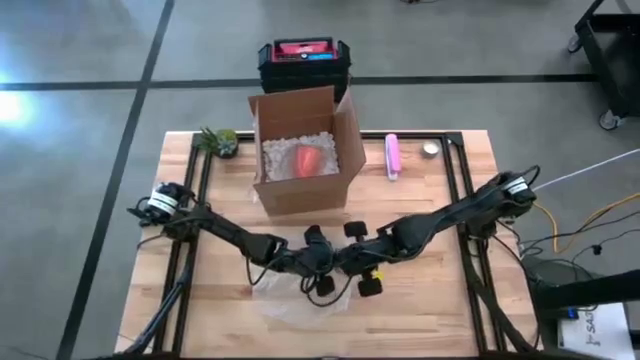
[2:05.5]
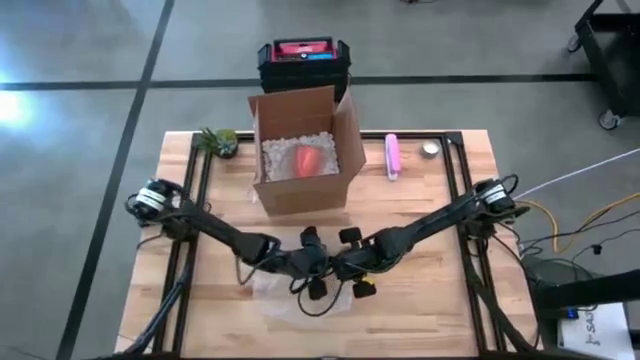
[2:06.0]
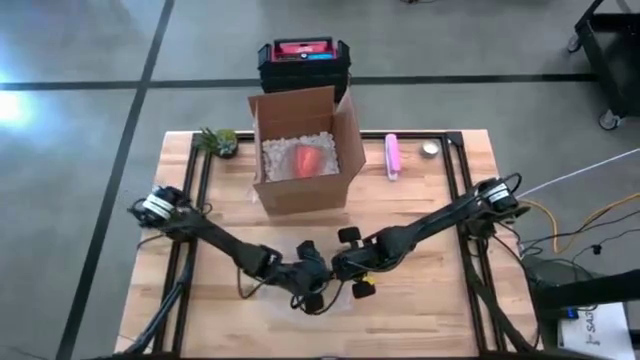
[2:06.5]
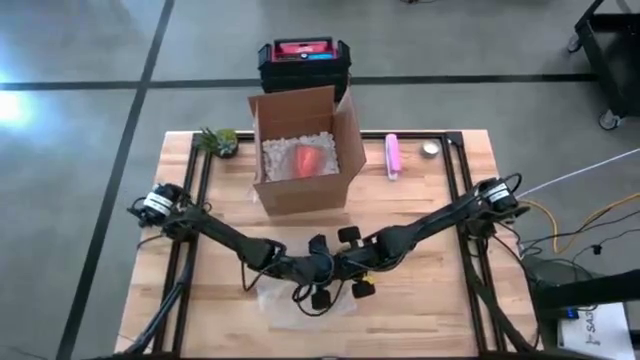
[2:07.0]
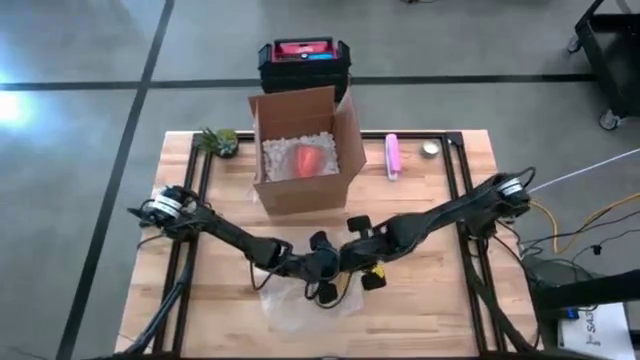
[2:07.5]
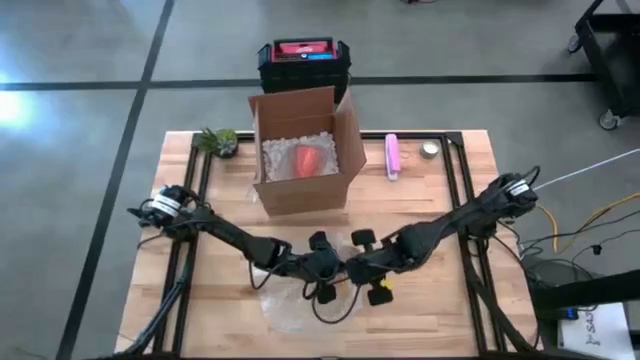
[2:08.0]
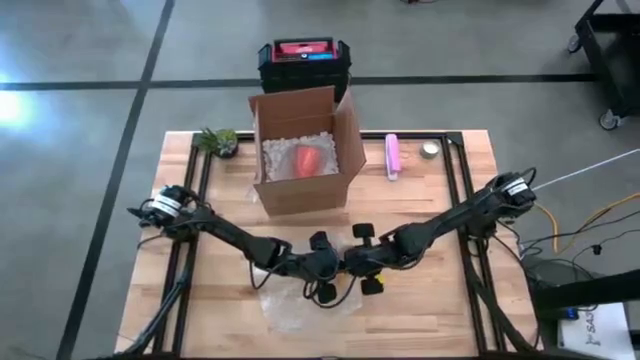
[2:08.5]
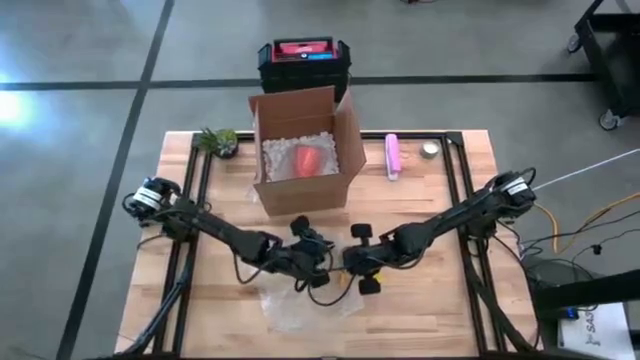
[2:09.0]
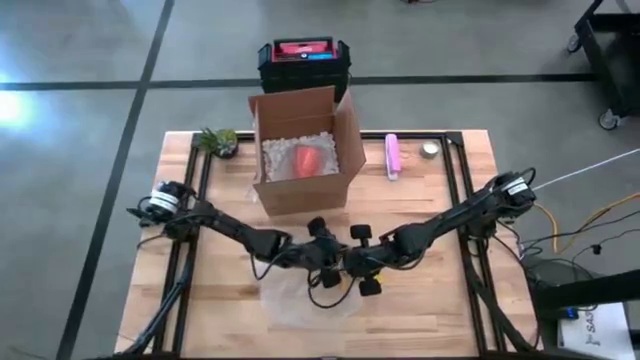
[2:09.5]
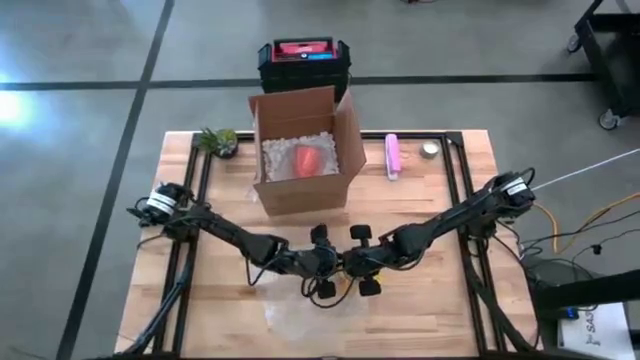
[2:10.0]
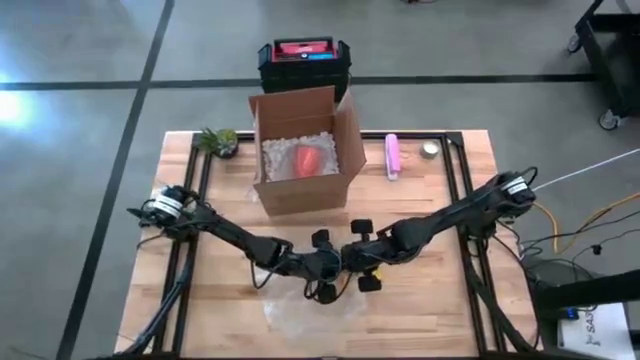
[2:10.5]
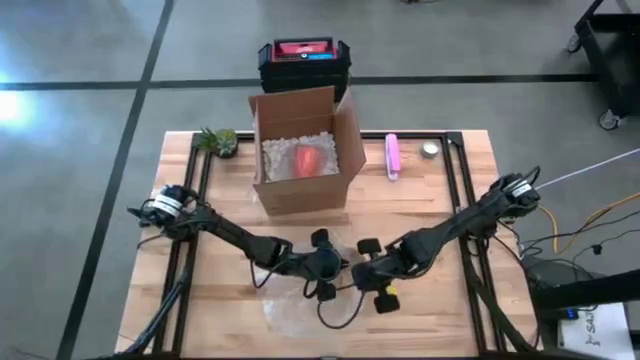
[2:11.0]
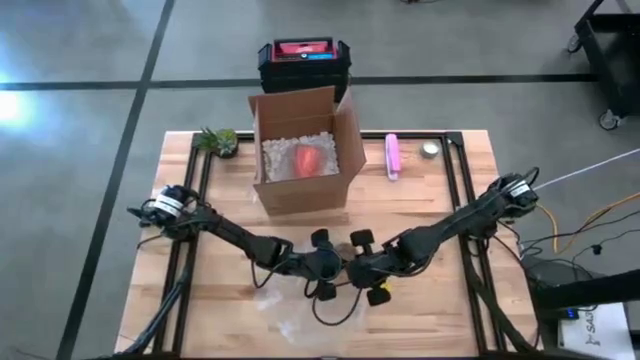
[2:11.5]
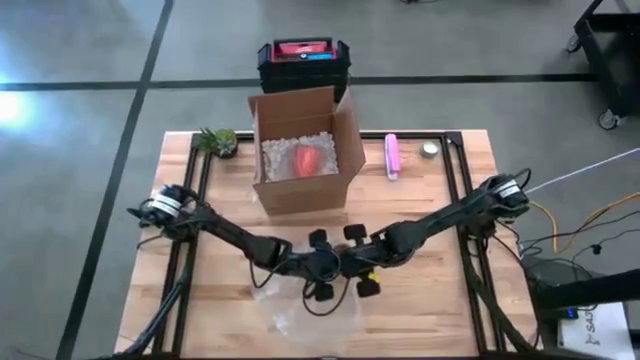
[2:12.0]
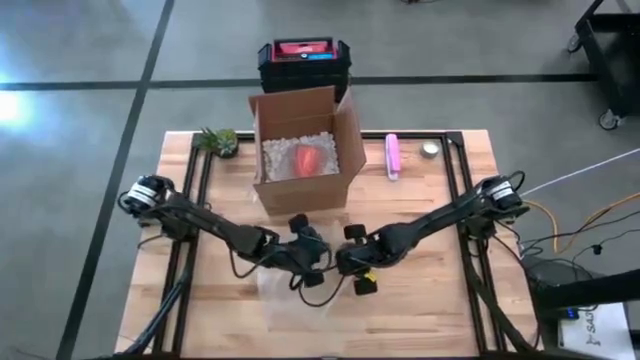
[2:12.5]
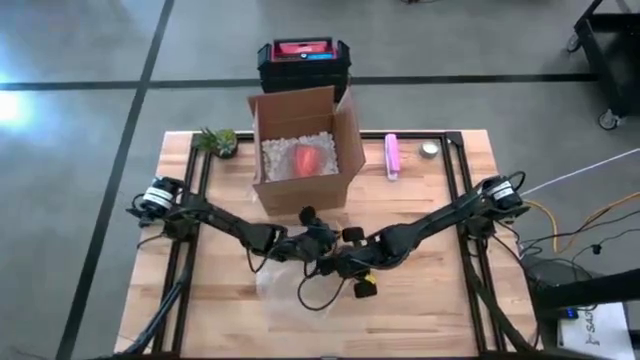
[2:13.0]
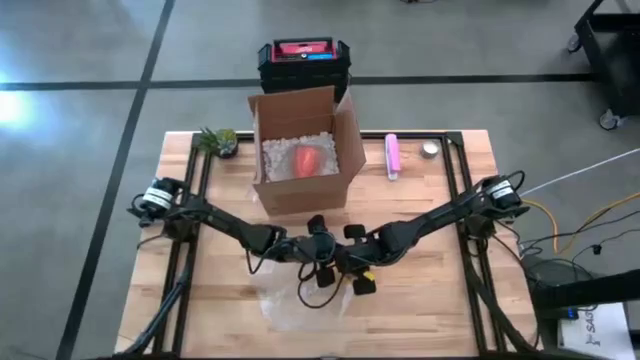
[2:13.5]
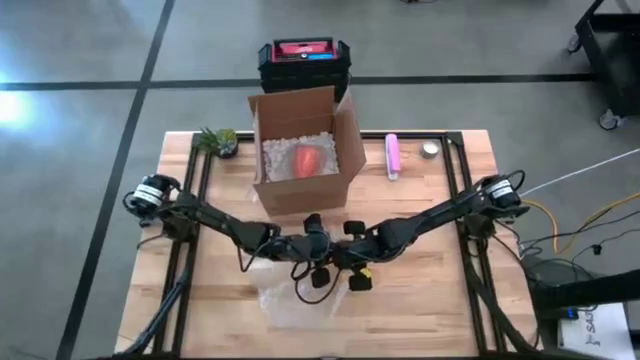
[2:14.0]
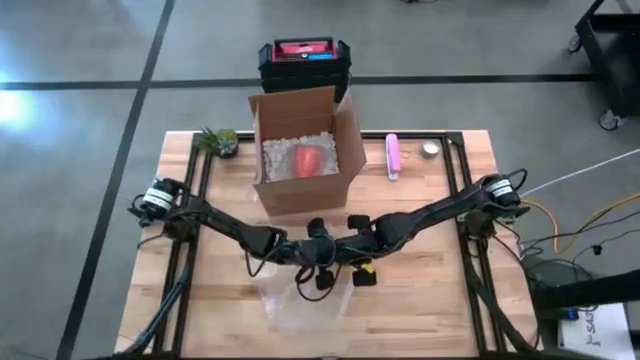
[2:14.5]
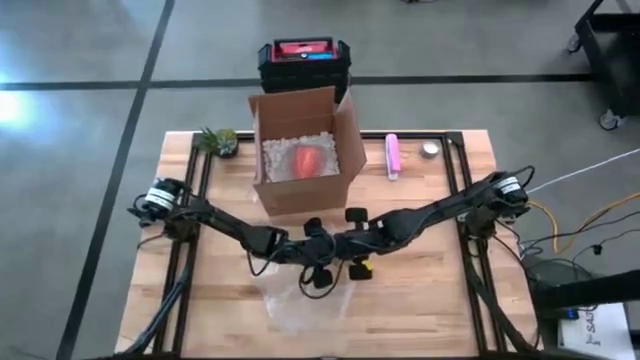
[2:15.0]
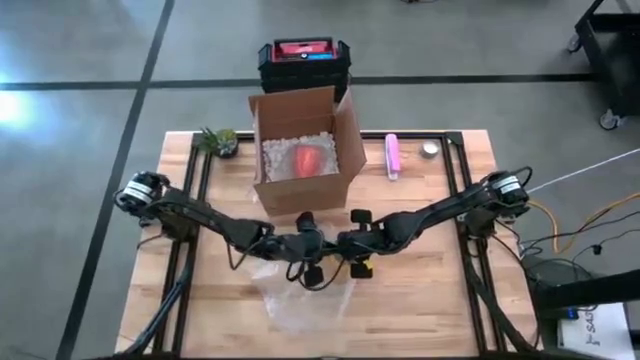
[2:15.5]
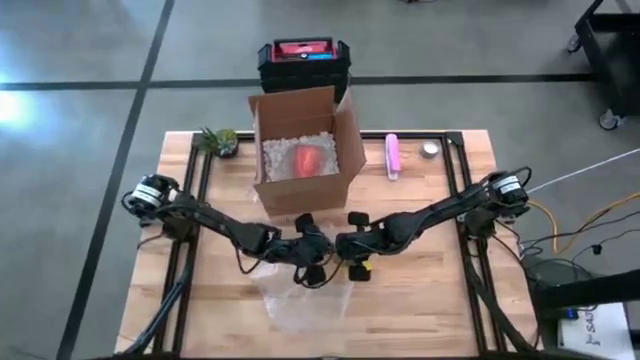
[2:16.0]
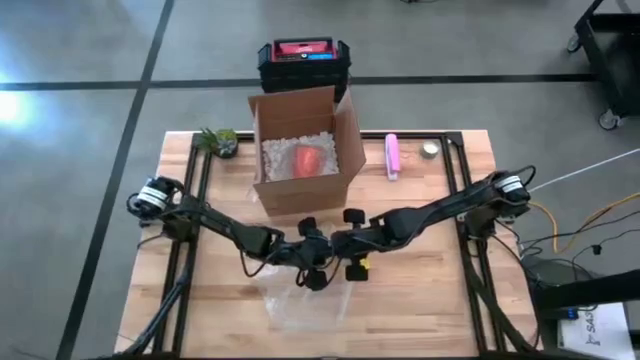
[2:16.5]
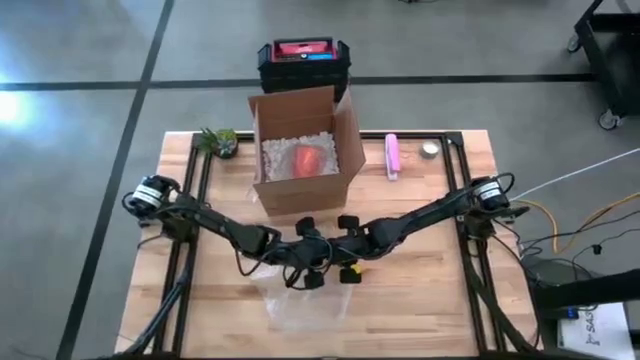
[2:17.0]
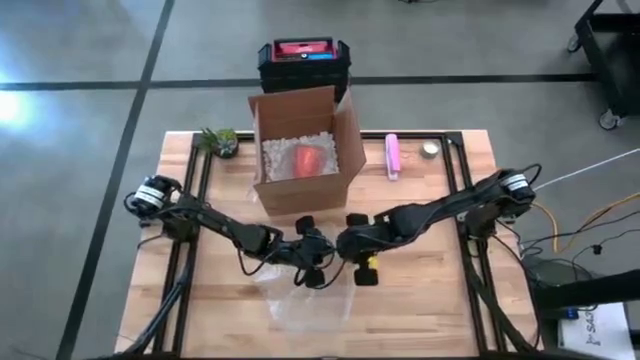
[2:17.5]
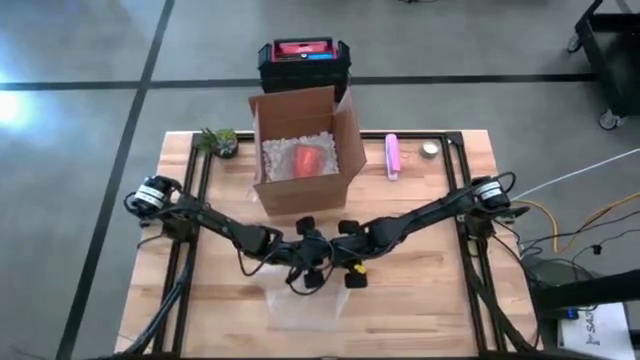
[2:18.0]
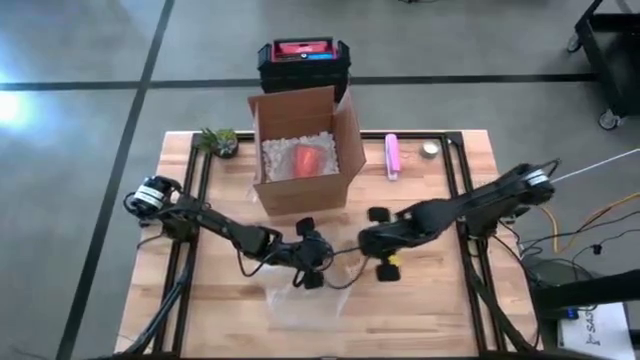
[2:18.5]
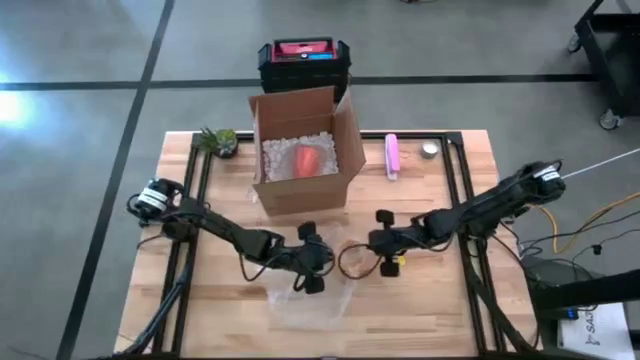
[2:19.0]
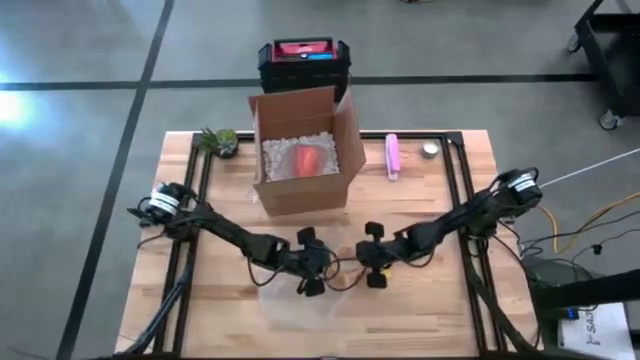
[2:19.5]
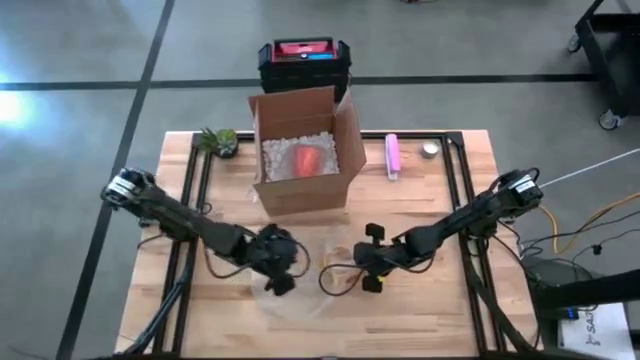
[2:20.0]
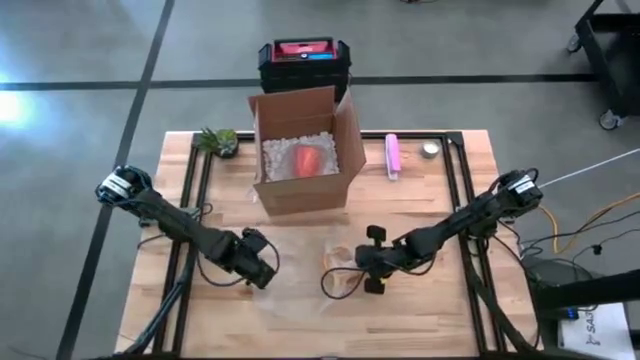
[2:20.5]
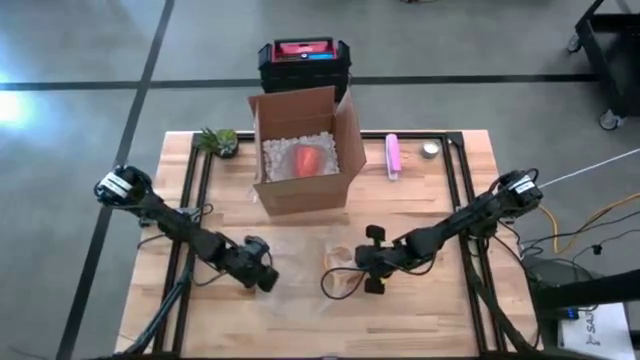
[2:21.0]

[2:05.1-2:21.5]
Task: wrap mug
Wrap the yellow mug in the transparent bubble wrap

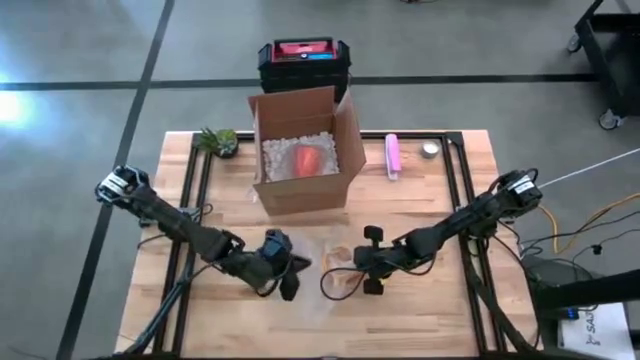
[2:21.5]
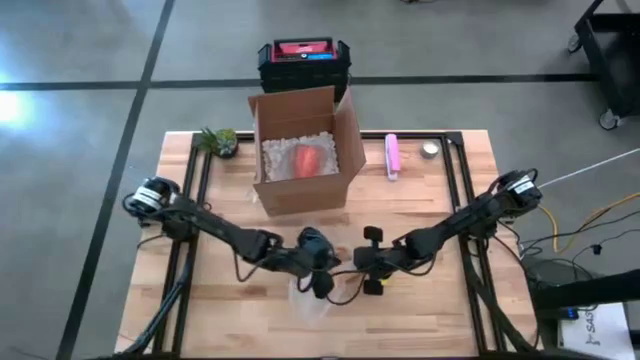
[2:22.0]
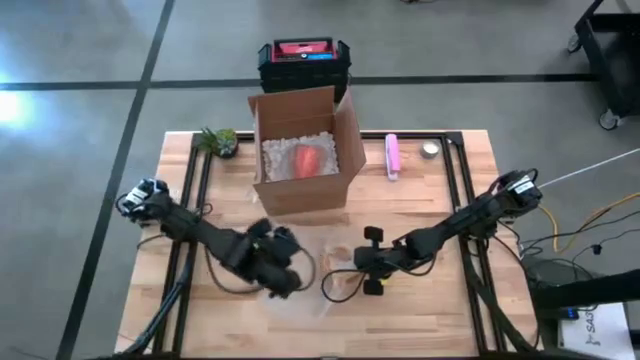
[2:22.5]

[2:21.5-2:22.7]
Wrap the yellow mug in the transparent bubble wrap

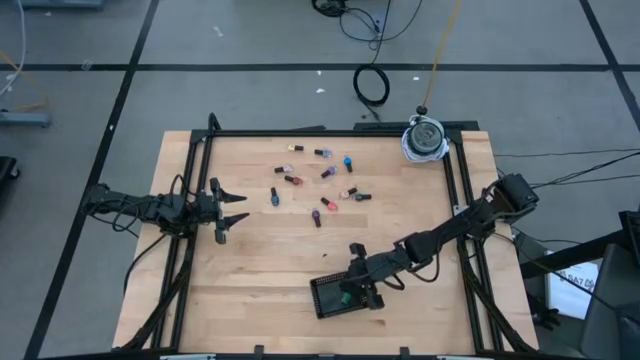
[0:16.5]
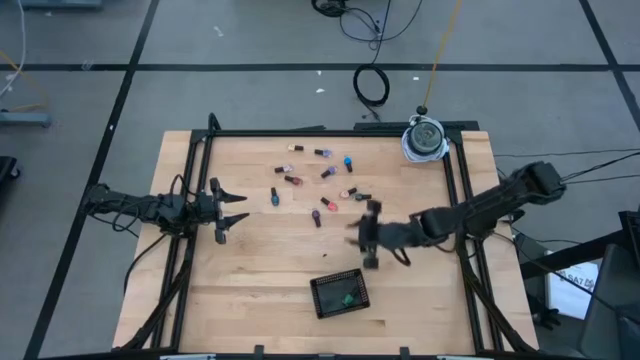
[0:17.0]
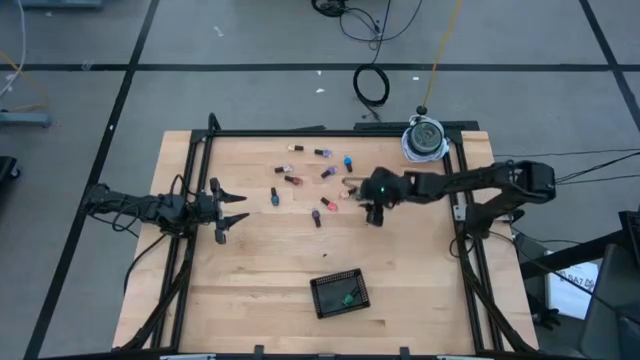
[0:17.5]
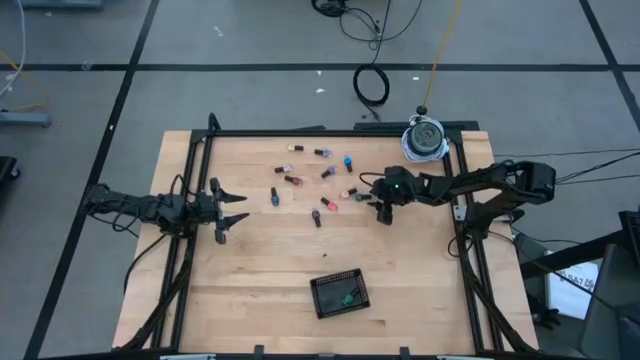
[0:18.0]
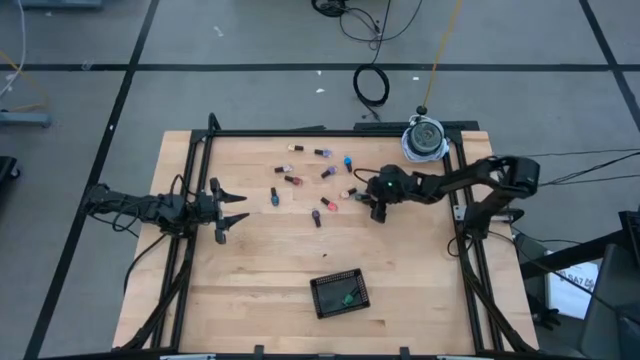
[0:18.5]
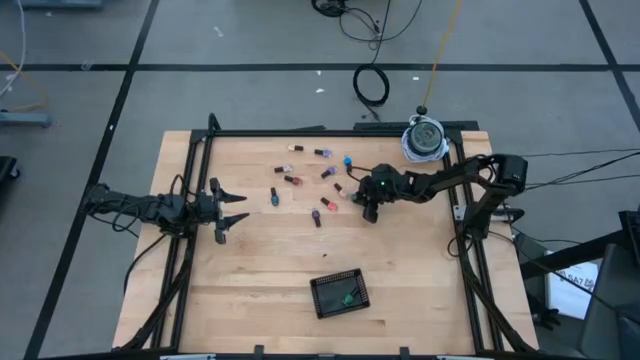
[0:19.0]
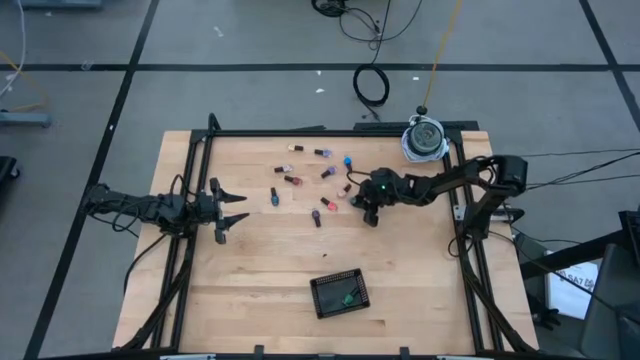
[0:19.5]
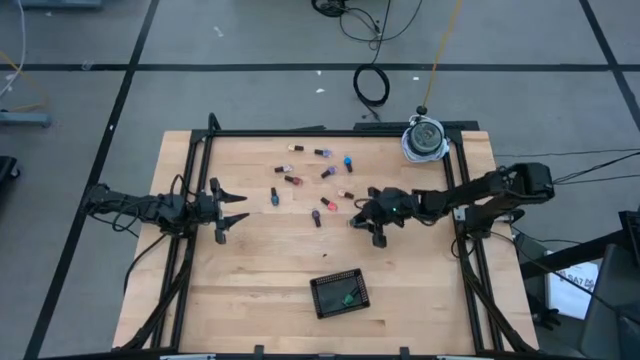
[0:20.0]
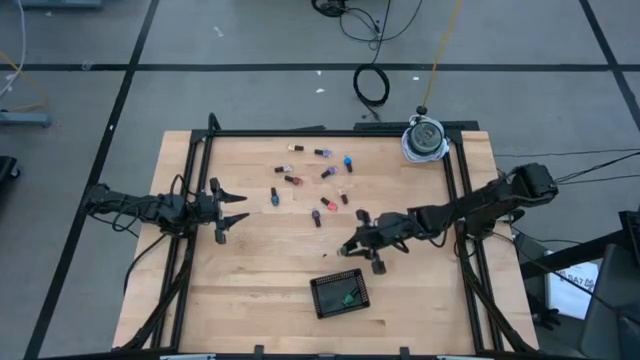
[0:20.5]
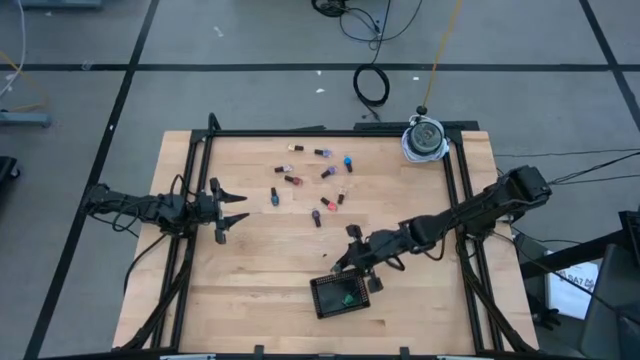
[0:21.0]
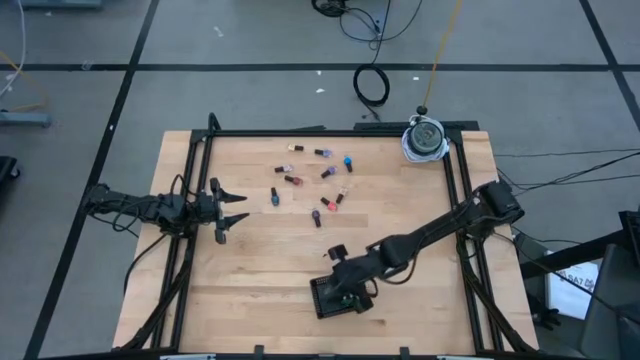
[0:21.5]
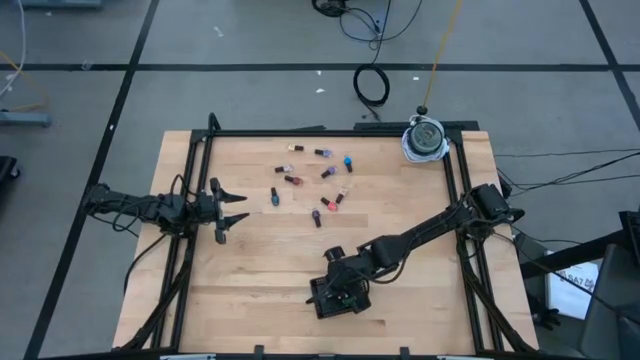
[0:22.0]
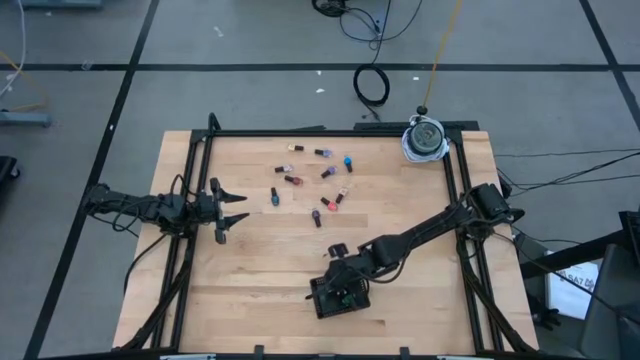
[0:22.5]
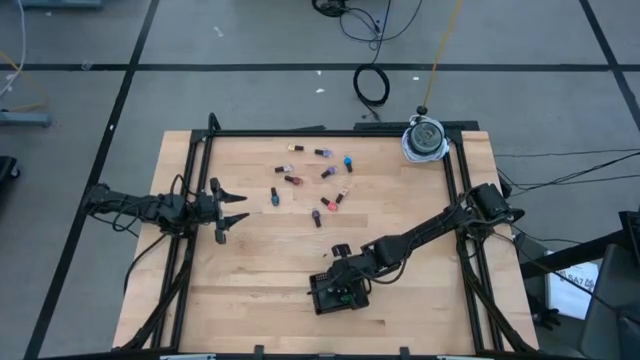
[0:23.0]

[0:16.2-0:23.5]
Task: Pick & Place Nail Polish
Put the dark green nail polish bottle into the black bin
